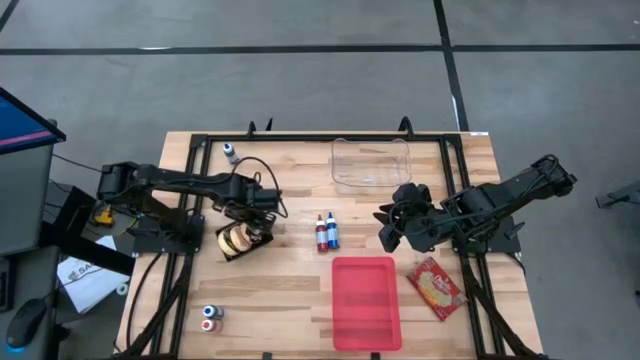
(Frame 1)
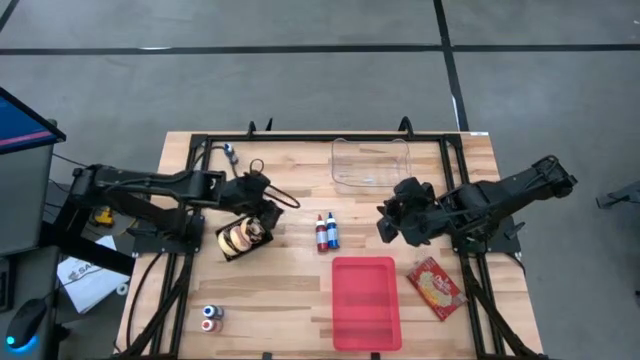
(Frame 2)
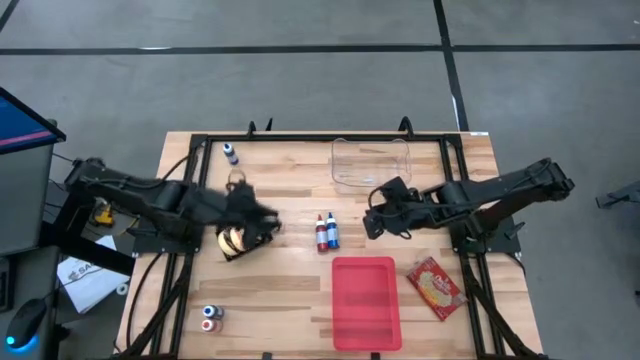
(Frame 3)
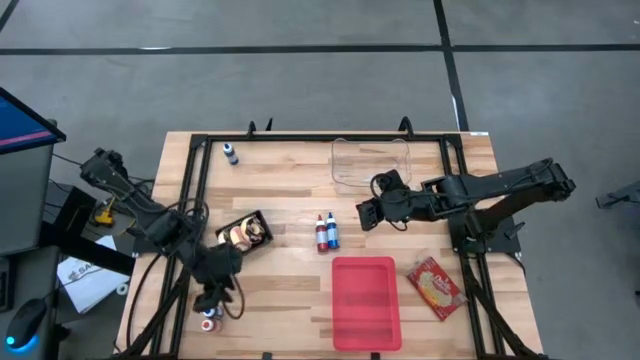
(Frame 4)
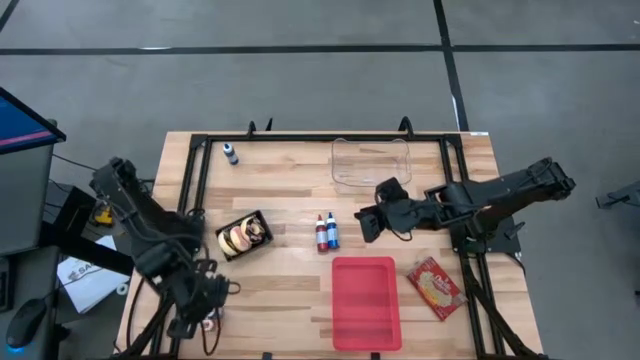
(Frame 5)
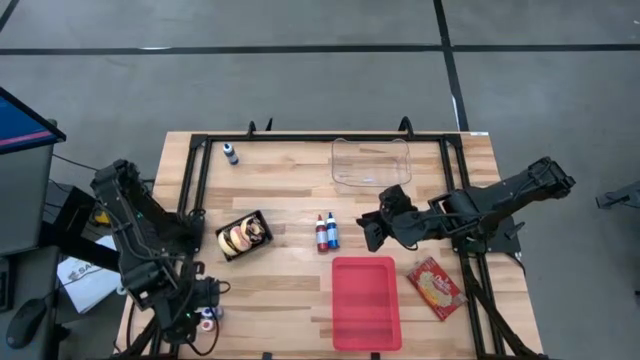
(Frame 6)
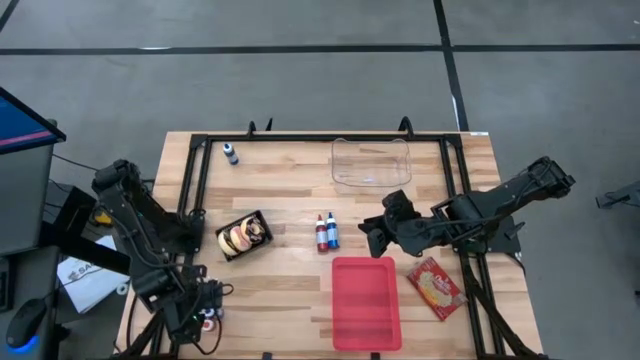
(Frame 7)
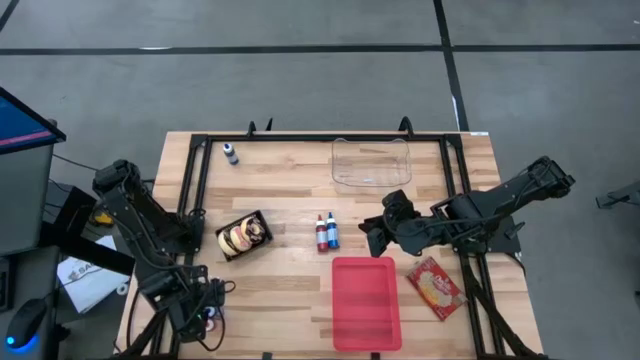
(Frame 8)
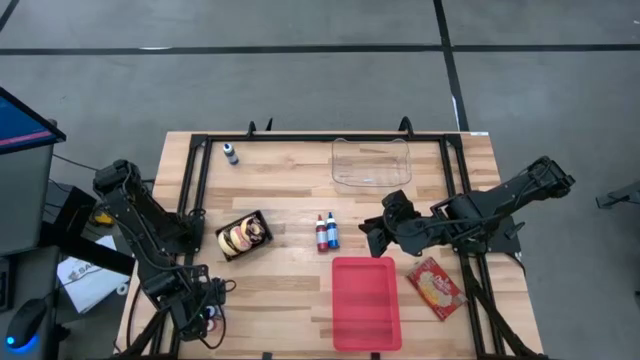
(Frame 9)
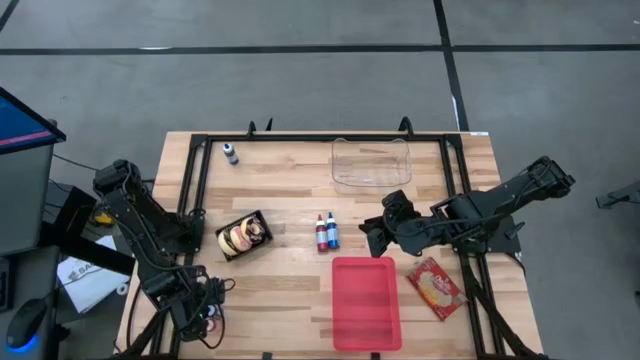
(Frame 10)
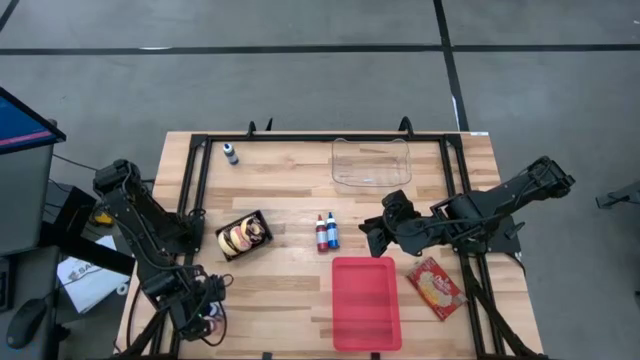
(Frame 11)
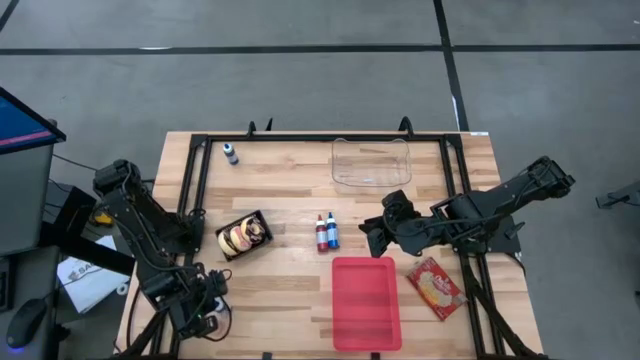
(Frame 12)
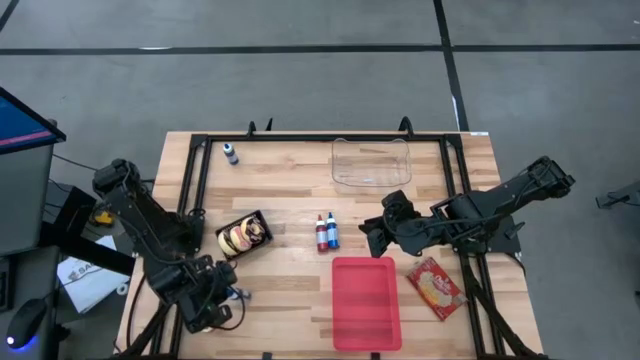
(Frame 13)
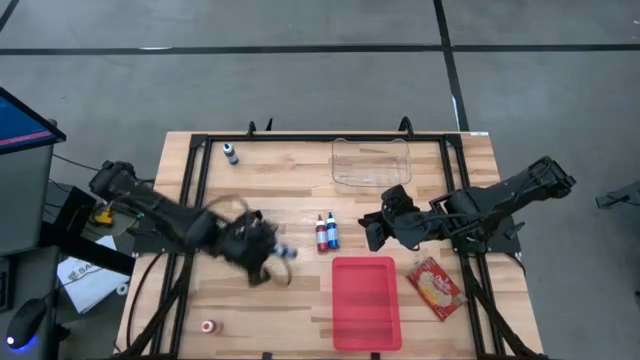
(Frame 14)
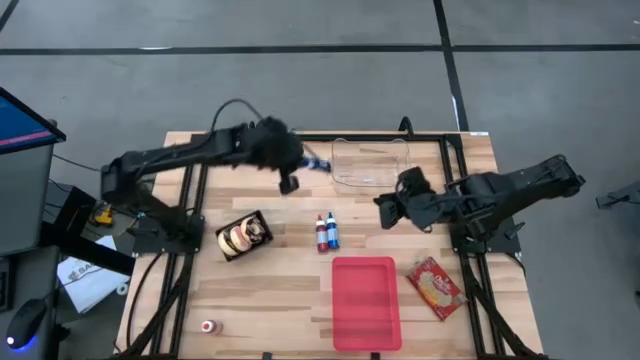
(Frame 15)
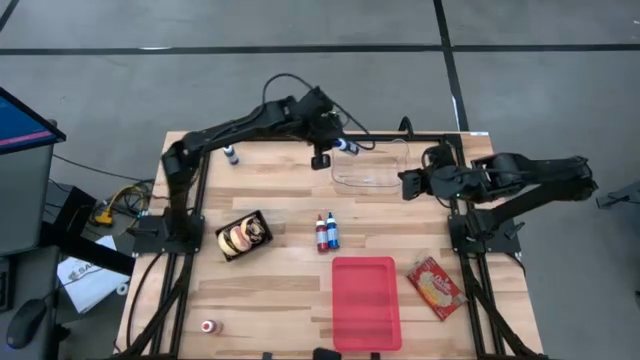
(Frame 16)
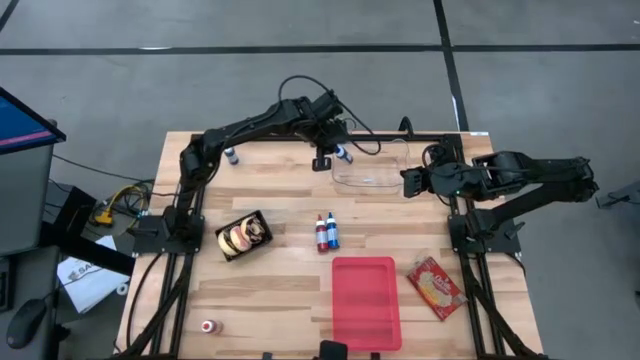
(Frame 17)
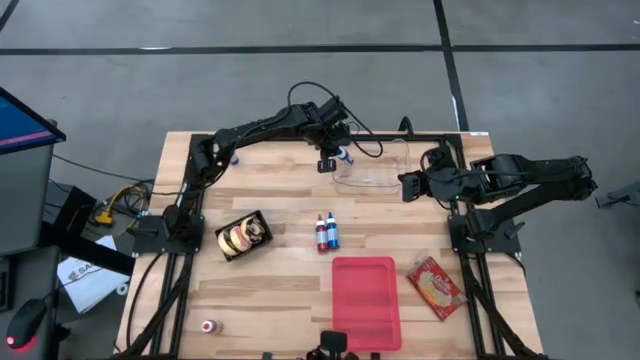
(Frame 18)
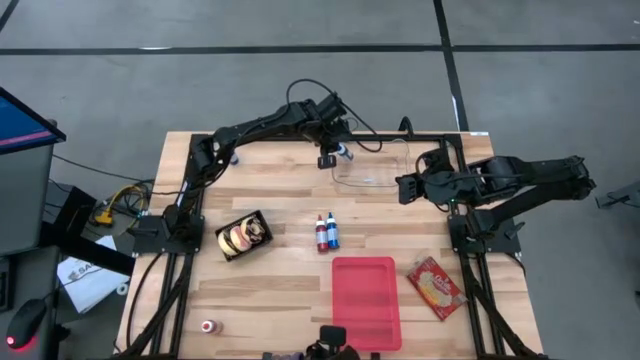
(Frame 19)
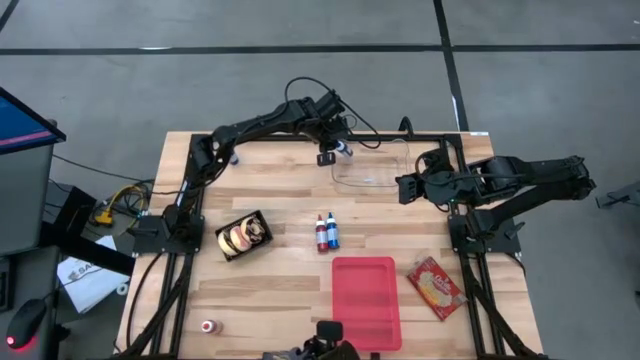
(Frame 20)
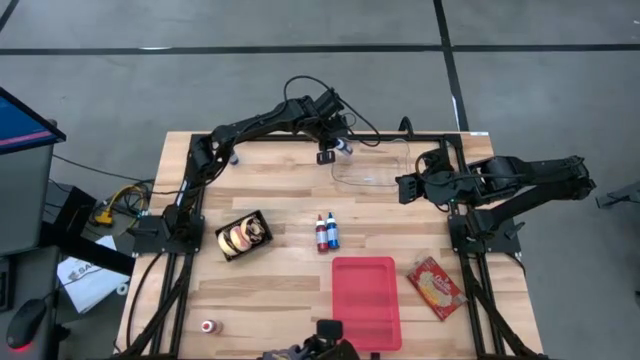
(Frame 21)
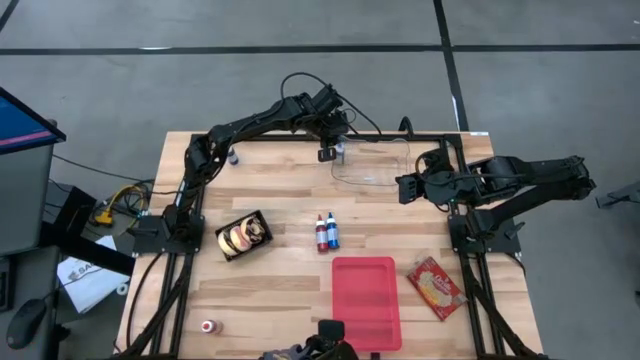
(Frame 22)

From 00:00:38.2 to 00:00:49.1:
Put the bottom blue food coloring bottle into the transparent bin

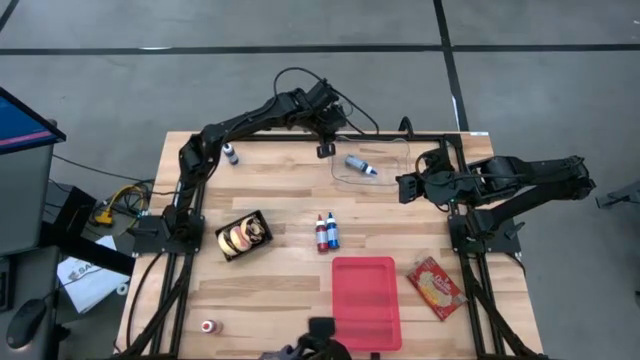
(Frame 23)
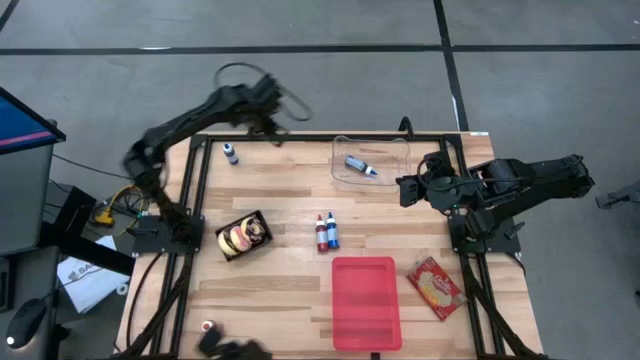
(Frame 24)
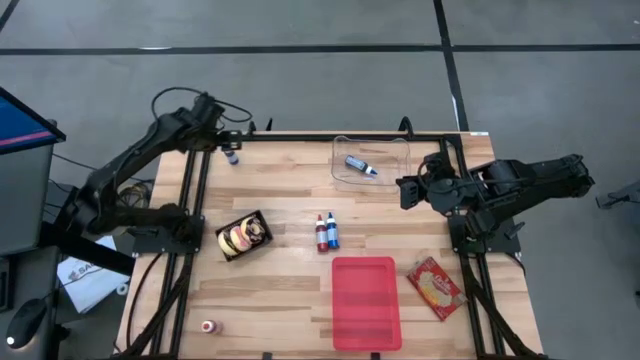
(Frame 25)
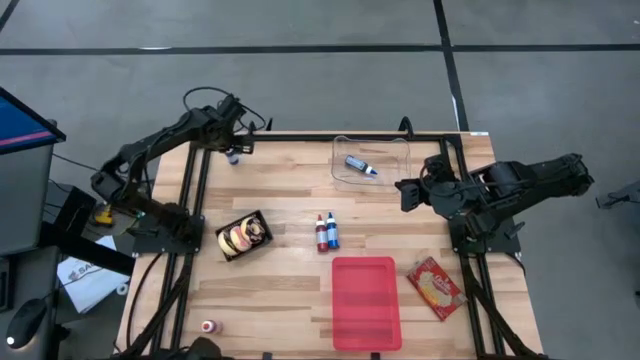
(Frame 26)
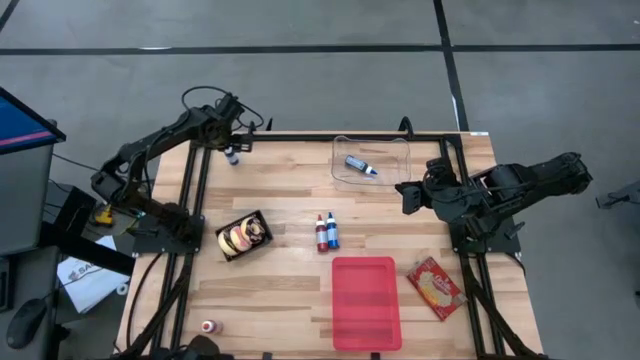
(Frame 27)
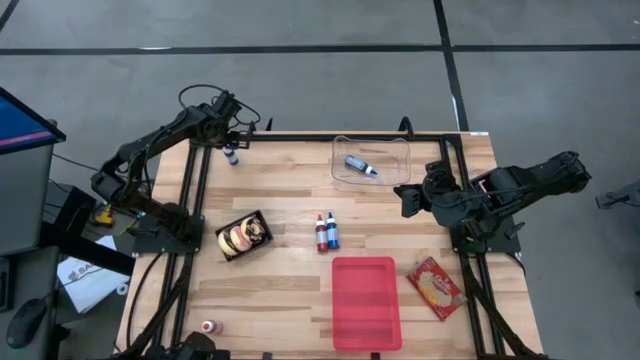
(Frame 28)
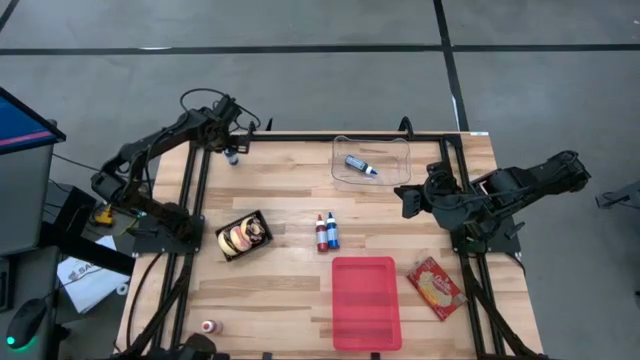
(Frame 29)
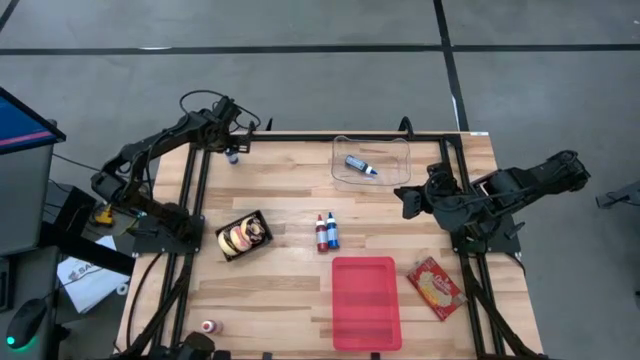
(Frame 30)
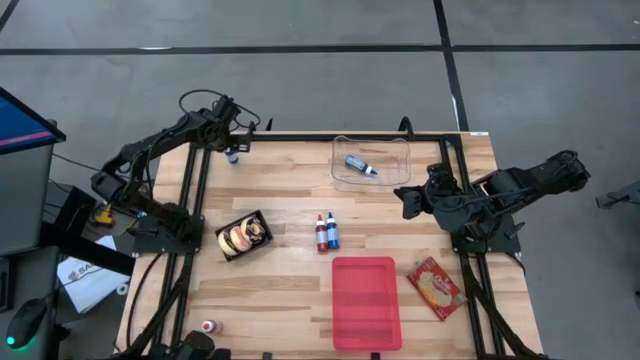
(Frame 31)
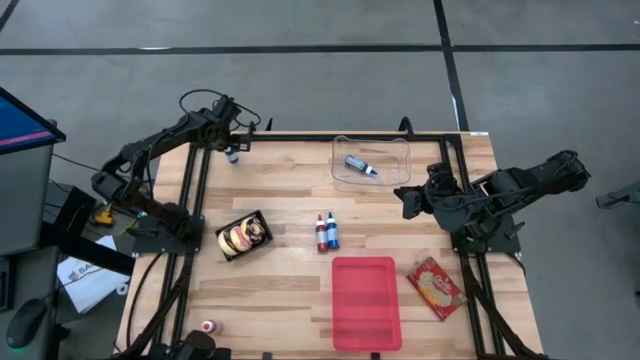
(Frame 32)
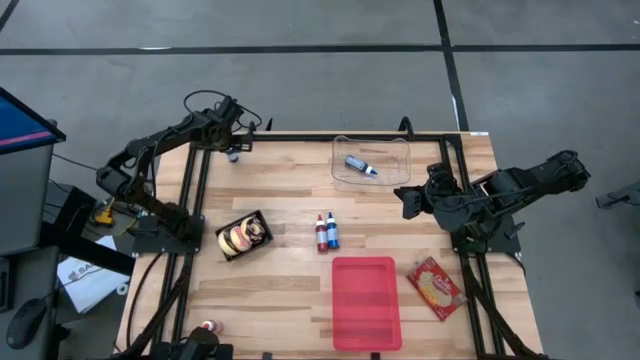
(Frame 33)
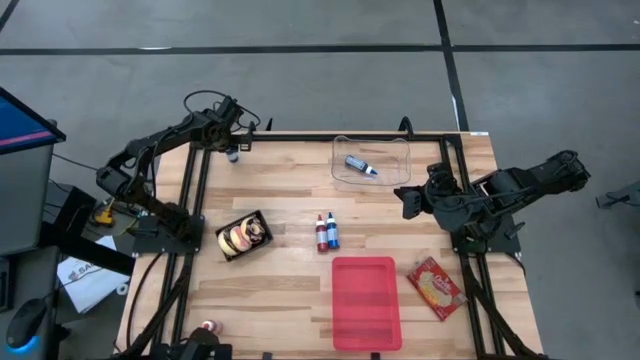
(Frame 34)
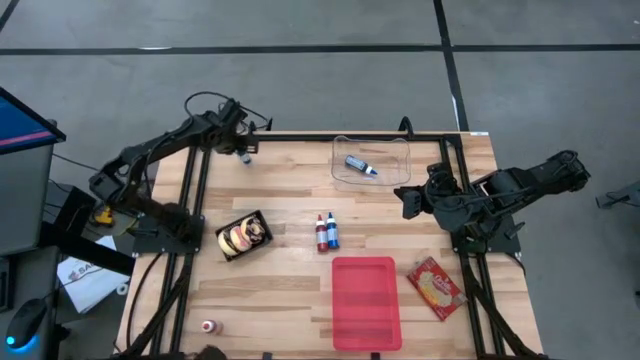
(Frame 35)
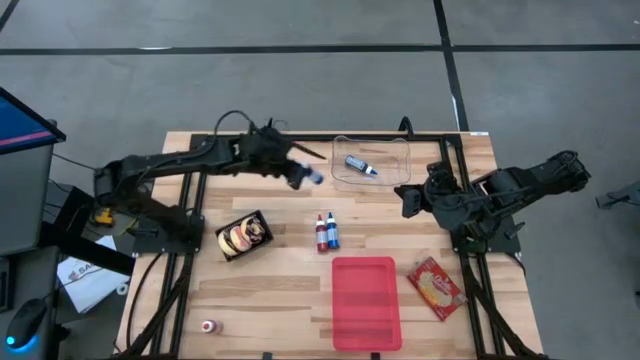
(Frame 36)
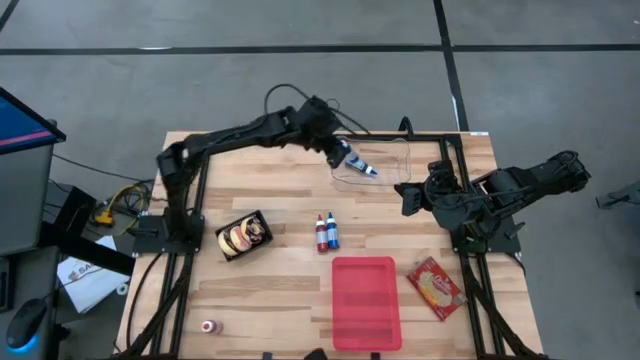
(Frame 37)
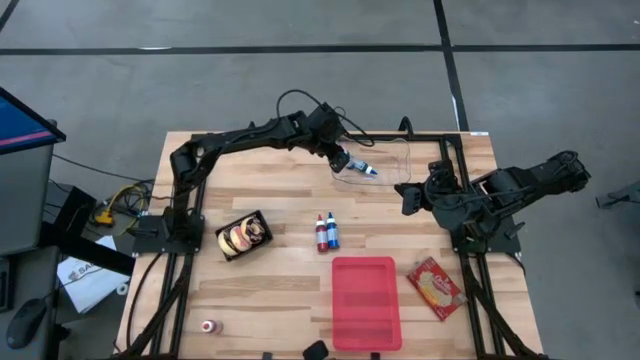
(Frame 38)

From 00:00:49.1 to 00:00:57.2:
Put the top blue food coloring bottle into the transparent bin

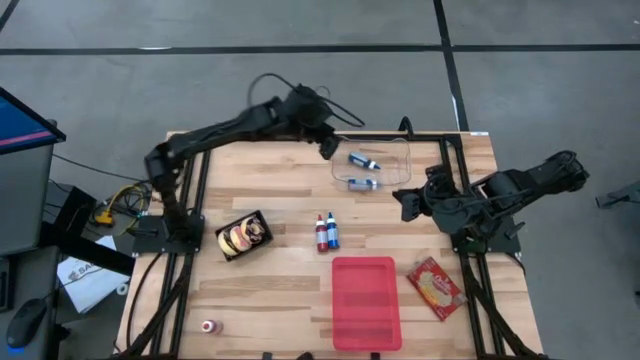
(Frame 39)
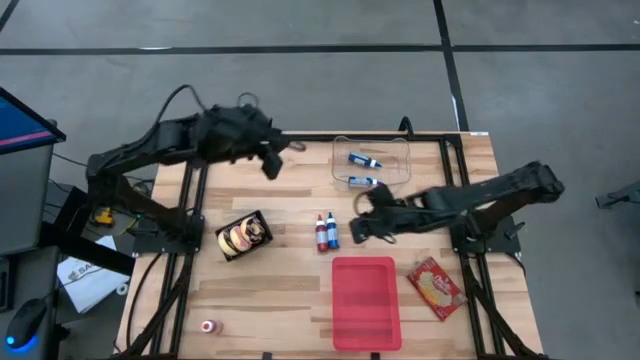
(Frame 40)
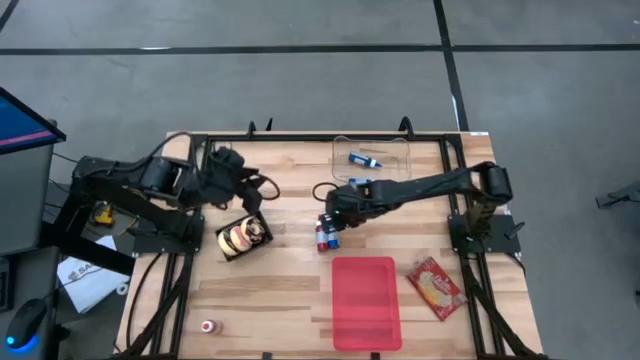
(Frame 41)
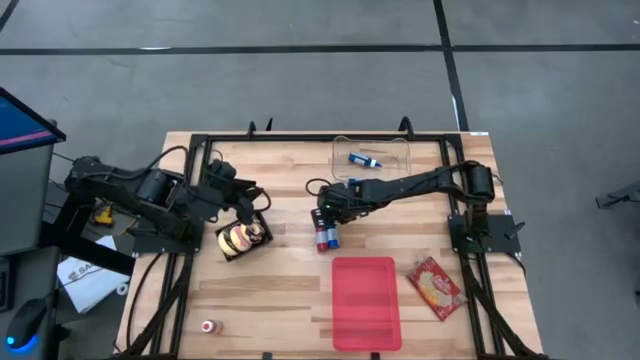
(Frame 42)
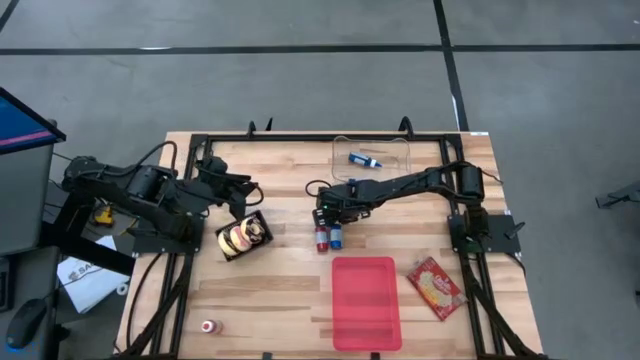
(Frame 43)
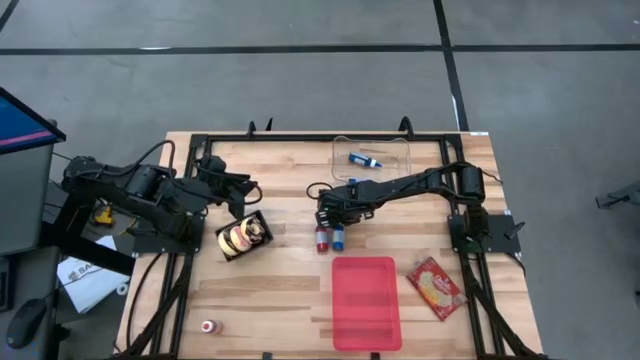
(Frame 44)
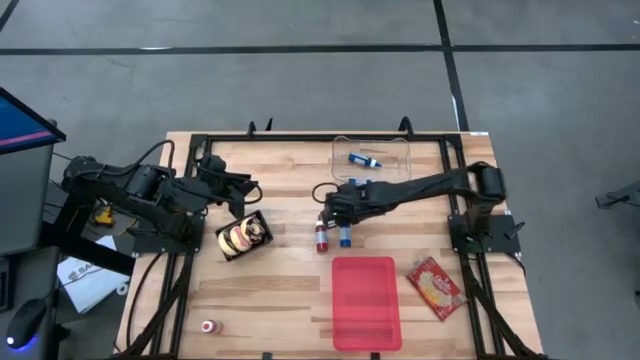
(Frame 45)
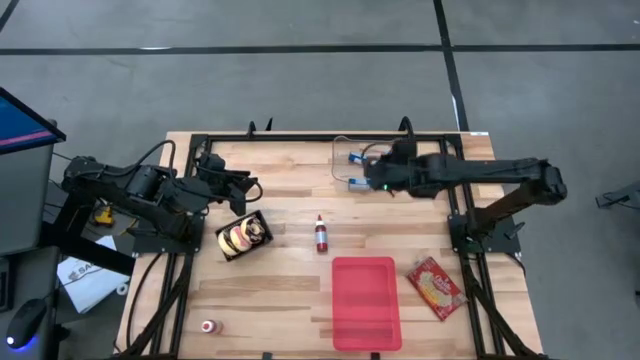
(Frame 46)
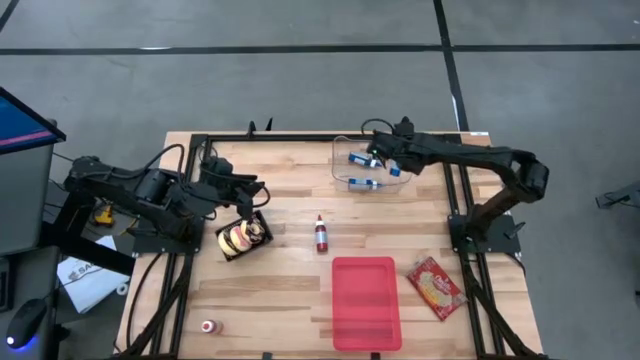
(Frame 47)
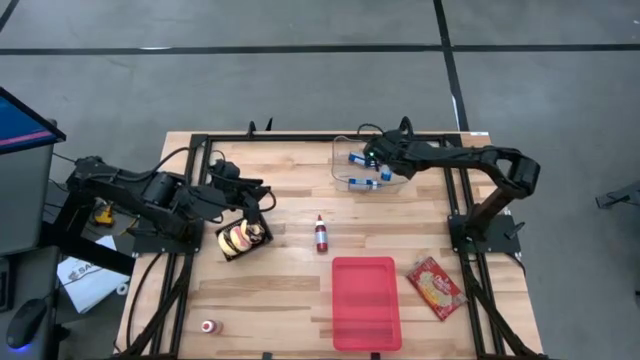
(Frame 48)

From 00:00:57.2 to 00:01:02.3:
Put the blue food coloring bottle into the transparent bin
